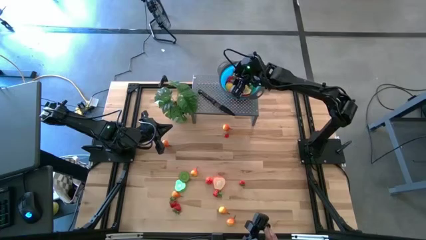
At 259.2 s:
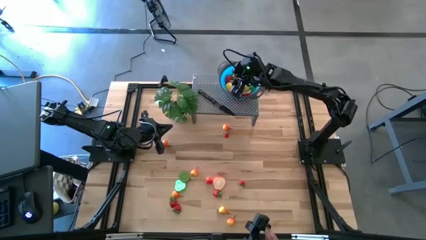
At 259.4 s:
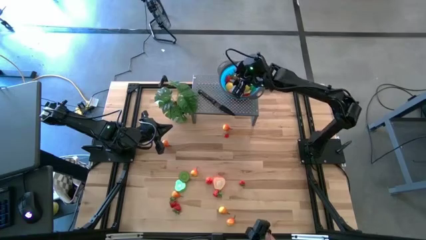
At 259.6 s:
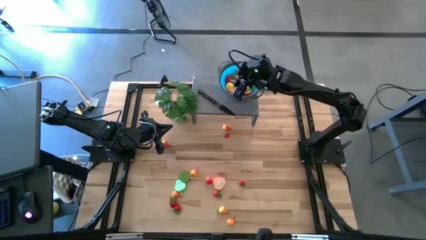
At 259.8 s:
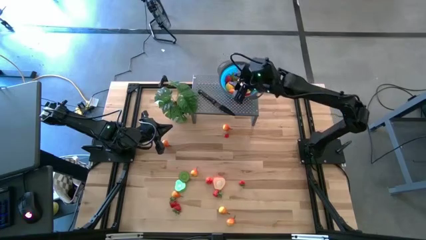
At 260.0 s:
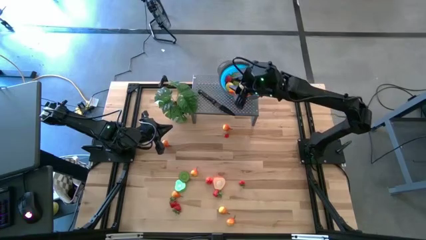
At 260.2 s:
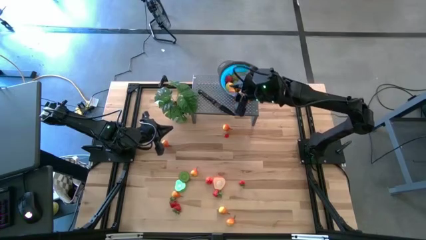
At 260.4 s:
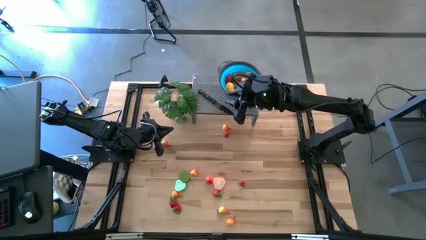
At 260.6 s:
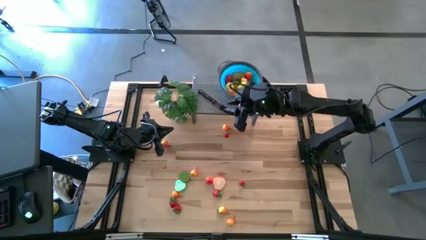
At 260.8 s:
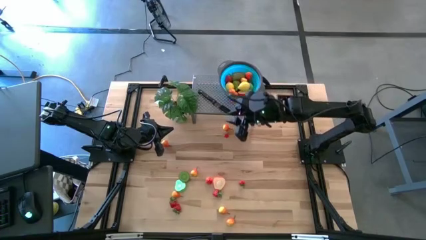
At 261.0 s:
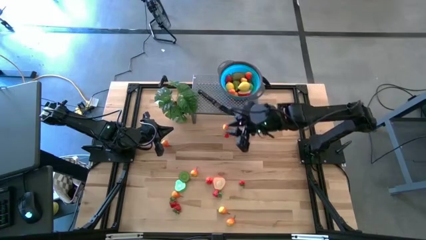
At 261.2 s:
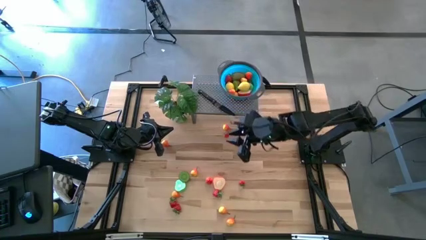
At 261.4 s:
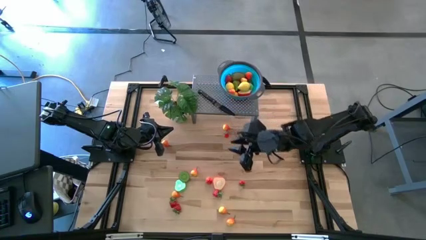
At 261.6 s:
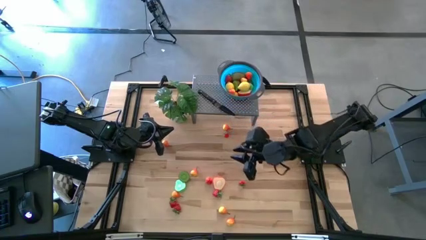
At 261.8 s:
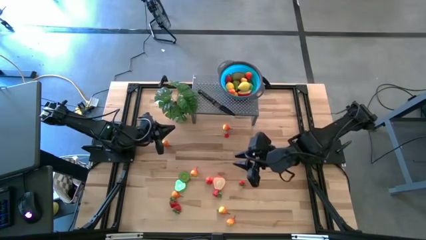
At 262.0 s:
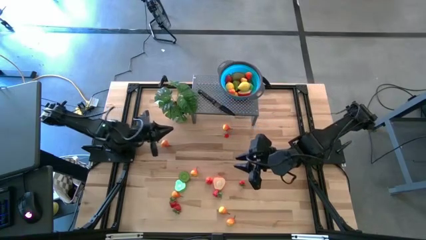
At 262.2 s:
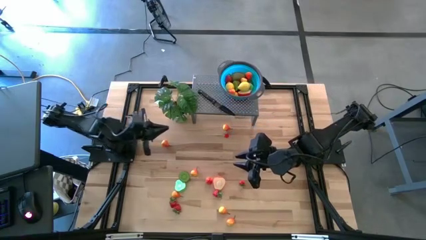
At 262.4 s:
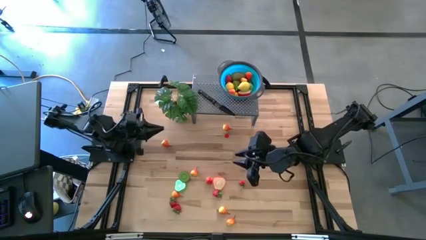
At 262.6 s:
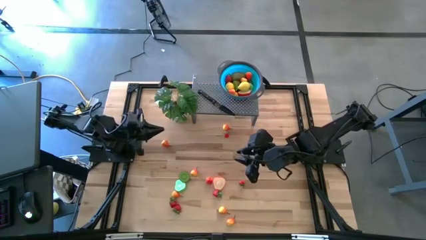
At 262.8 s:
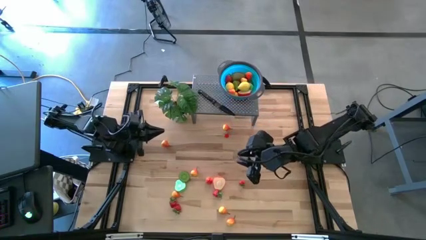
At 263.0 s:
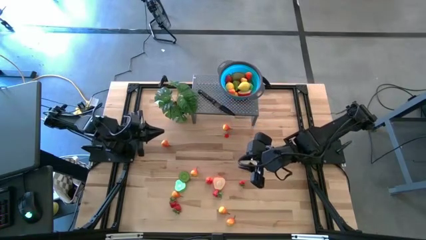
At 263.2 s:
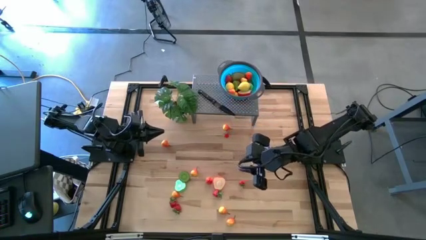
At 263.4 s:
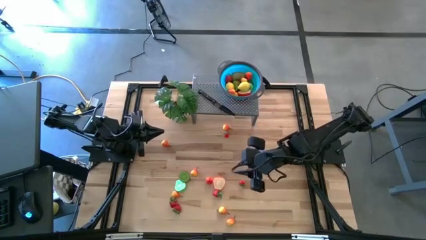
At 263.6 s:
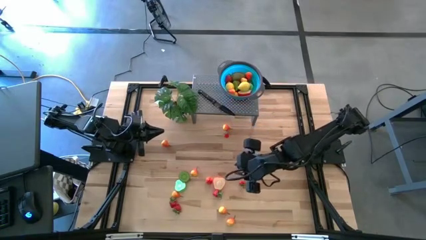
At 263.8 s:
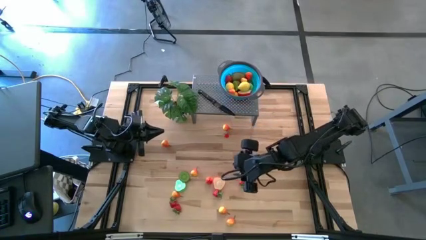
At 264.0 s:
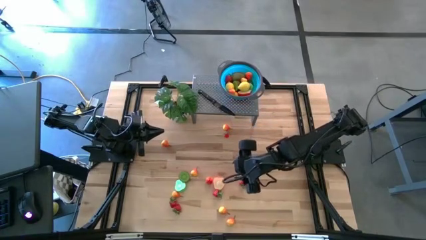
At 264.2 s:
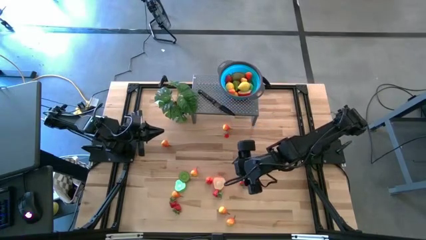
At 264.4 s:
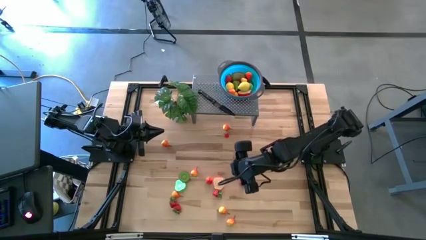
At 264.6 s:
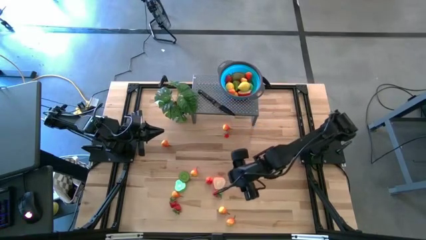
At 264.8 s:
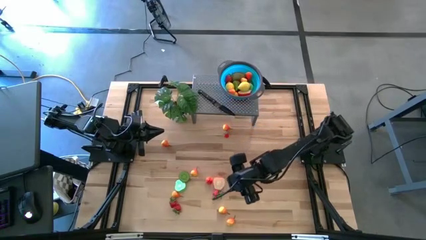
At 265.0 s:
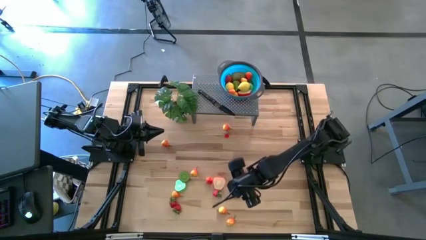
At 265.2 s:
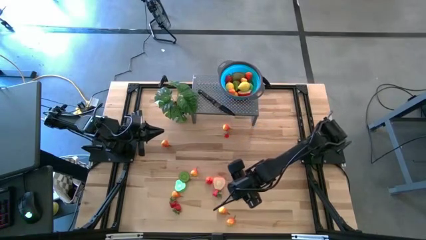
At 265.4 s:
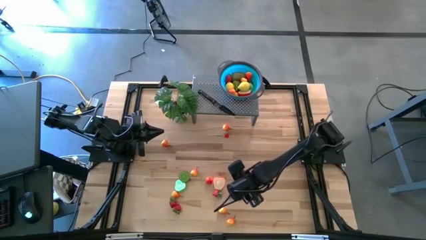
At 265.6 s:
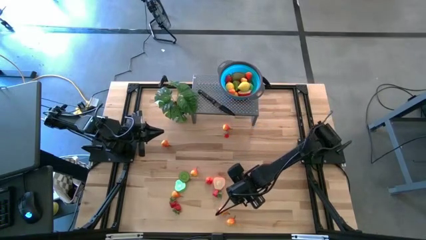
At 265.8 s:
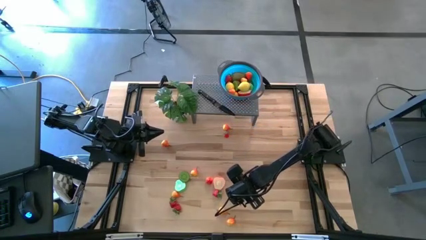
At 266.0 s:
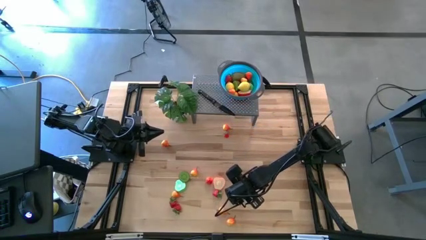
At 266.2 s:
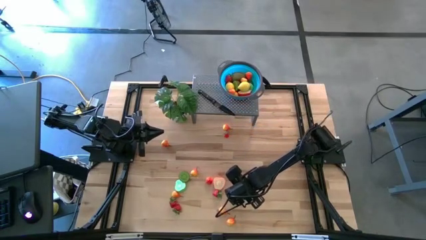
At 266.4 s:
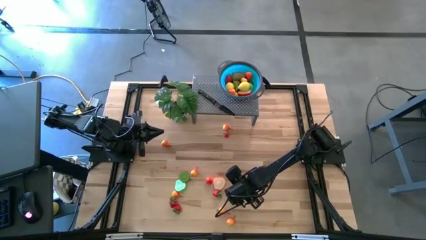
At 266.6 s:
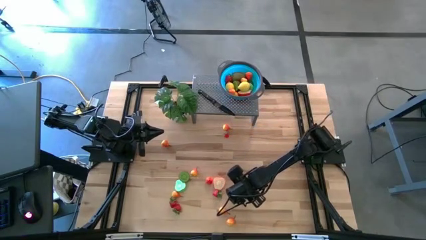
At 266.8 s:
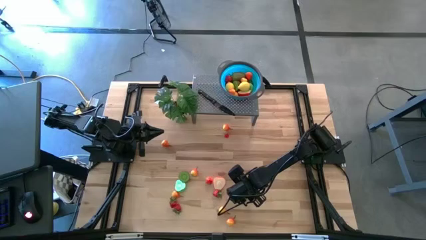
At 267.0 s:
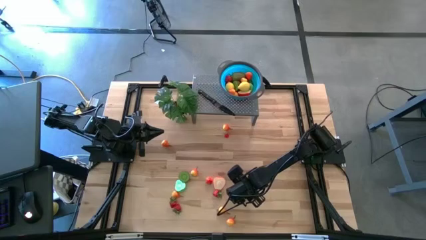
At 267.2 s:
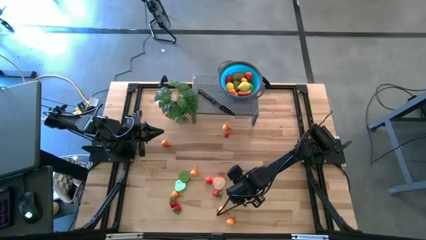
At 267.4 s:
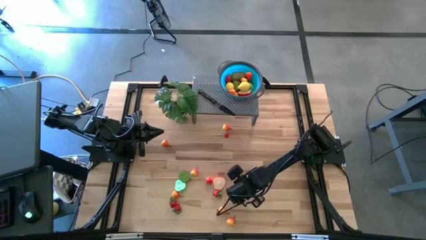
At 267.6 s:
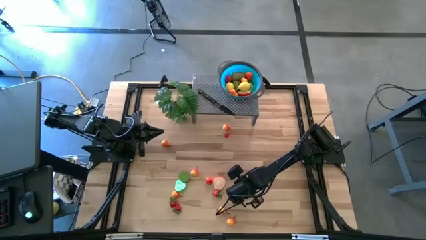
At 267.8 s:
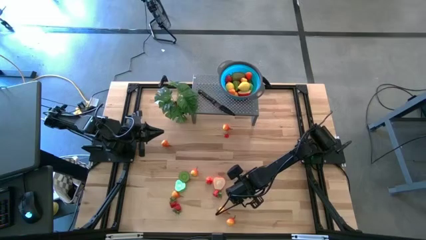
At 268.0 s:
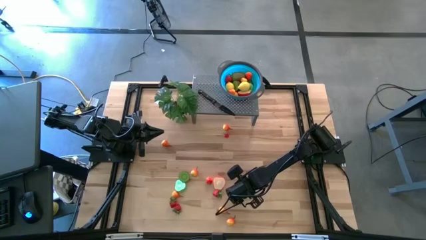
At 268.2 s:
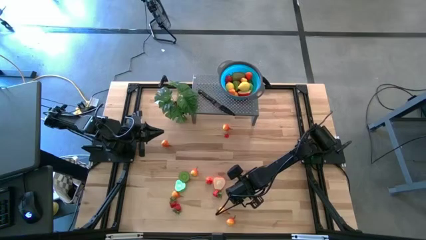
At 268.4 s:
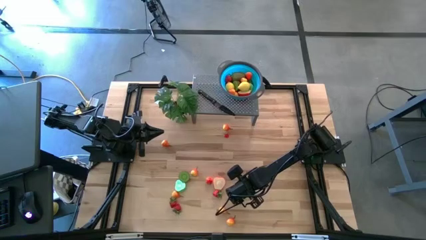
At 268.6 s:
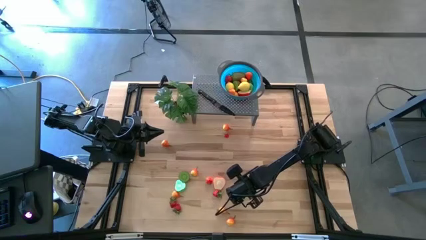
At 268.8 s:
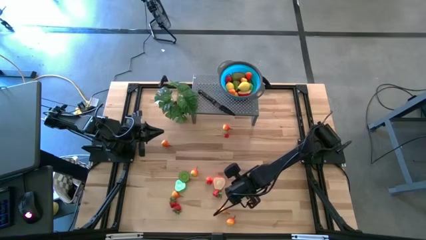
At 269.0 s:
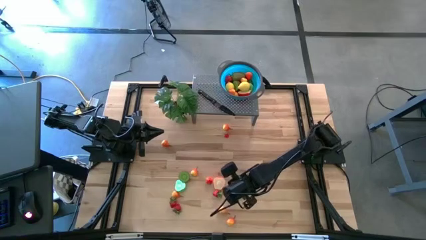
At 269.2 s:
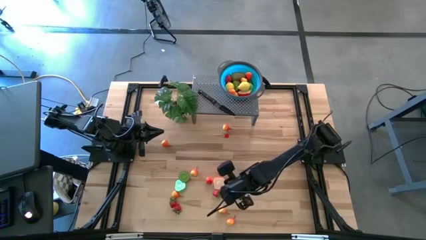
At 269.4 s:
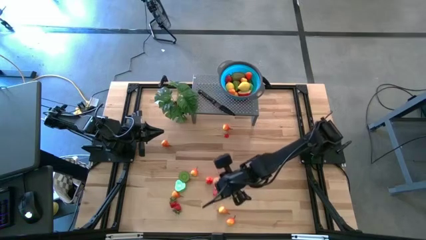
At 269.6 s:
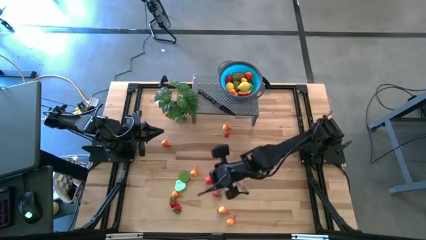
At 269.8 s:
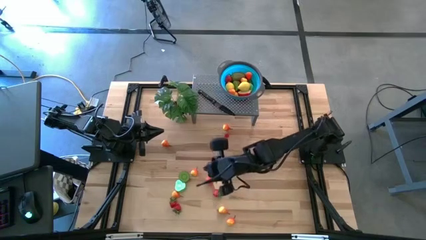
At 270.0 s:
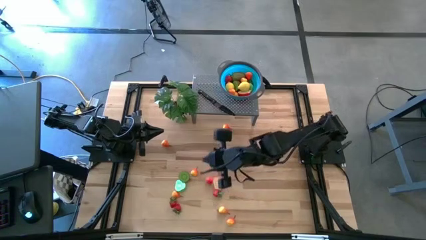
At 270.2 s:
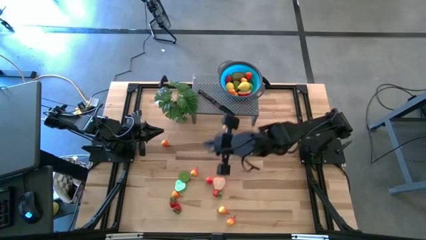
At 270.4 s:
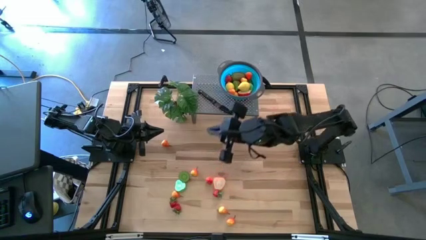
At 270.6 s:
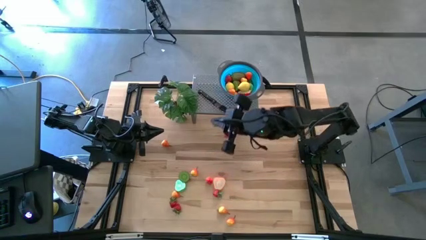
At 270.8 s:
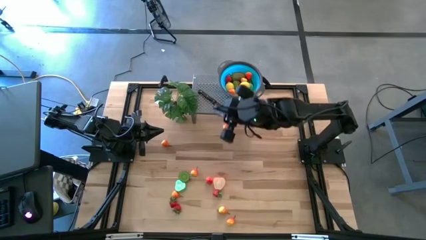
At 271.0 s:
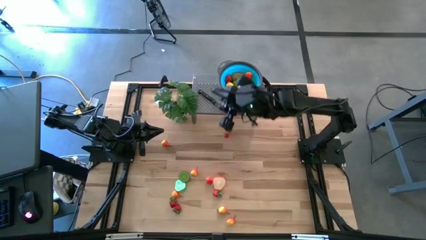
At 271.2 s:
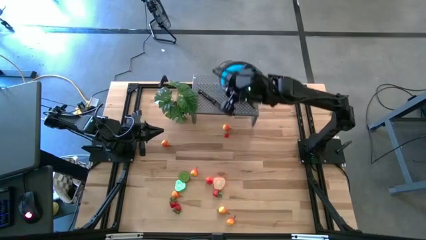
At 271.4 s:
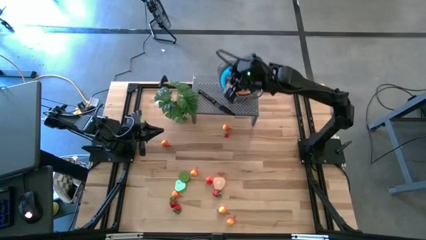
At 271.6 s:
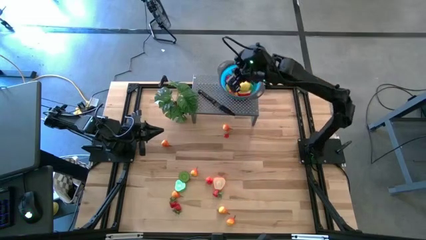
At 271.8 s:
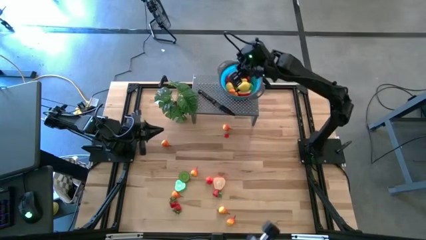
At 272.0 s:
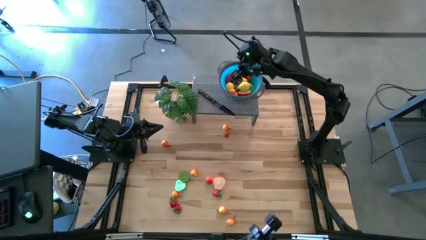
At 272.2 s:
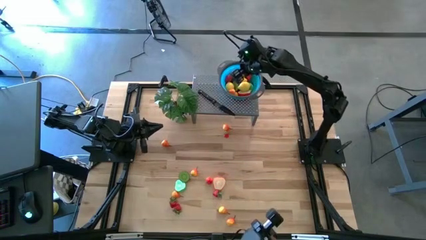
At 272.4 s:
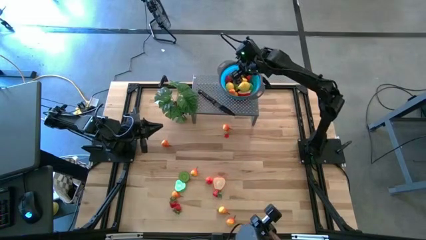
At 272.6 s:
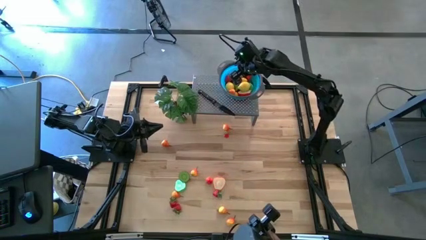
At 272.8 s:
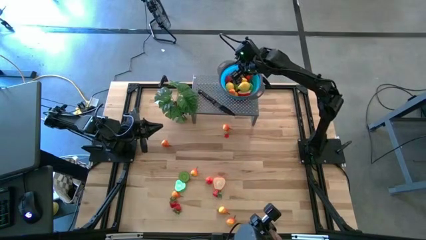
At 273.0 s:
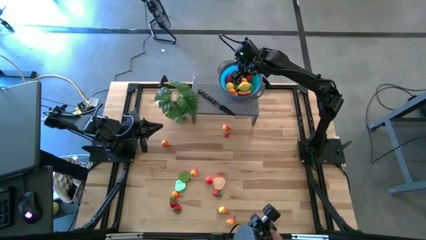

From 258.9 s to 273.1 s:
Task: Pick & Place Fruit
Put the red strawberry in the blue bowl on the shelf

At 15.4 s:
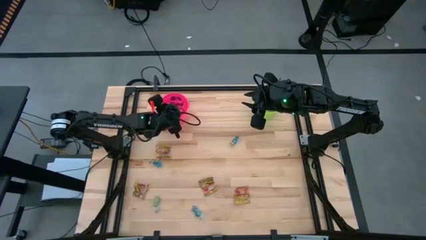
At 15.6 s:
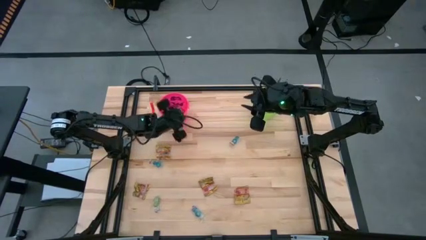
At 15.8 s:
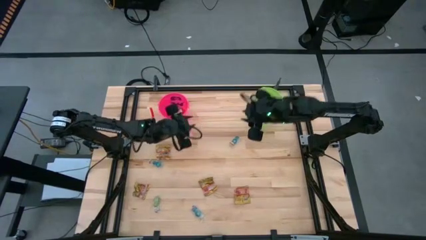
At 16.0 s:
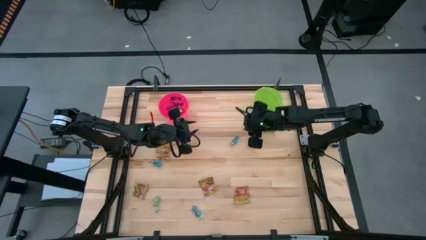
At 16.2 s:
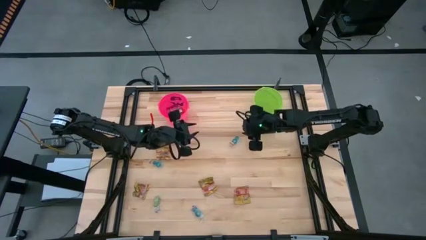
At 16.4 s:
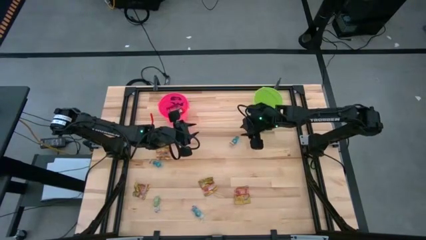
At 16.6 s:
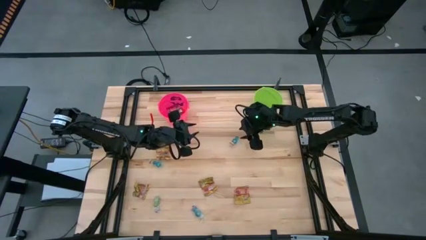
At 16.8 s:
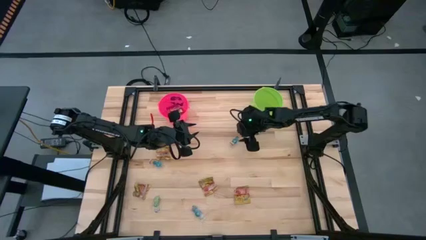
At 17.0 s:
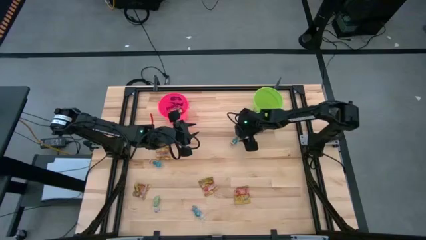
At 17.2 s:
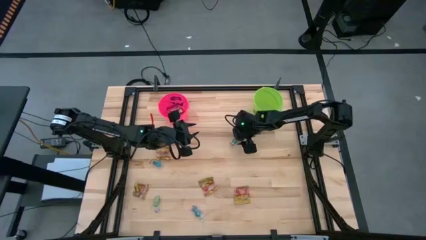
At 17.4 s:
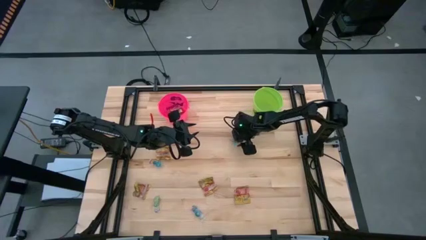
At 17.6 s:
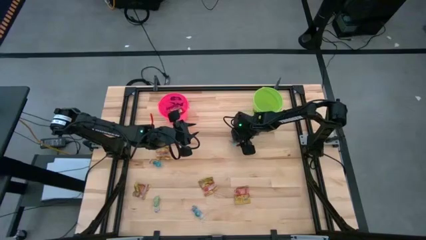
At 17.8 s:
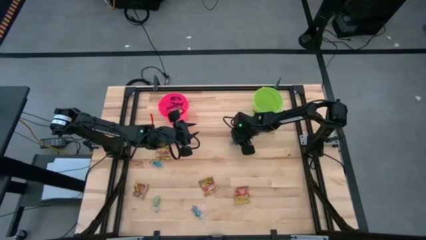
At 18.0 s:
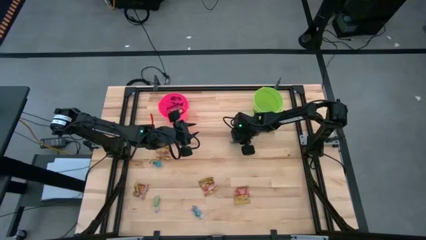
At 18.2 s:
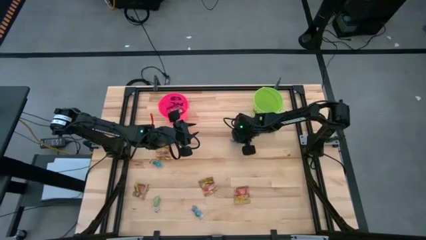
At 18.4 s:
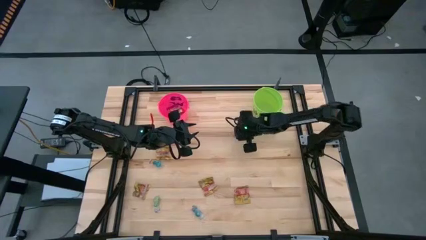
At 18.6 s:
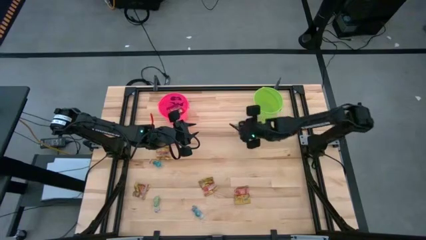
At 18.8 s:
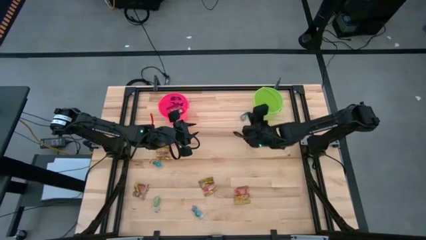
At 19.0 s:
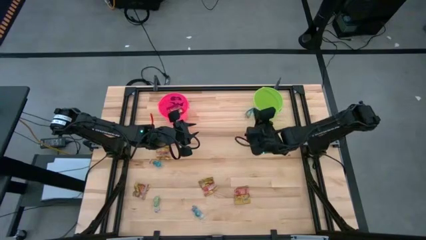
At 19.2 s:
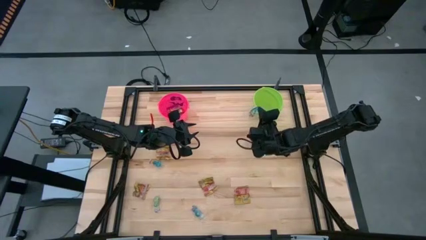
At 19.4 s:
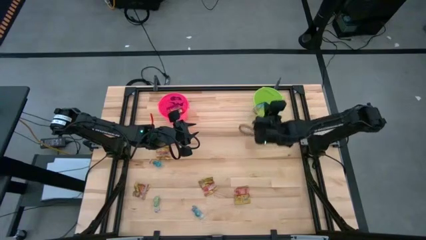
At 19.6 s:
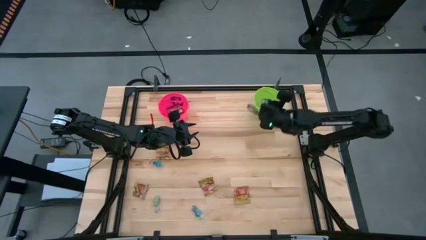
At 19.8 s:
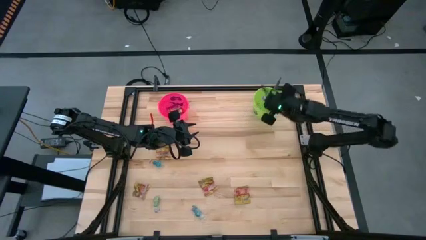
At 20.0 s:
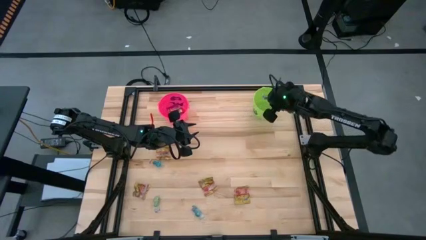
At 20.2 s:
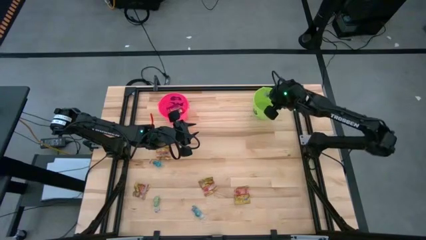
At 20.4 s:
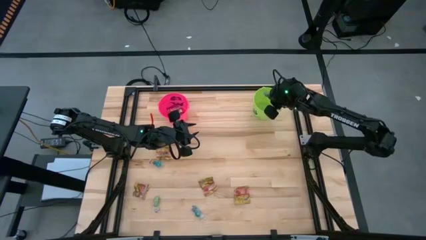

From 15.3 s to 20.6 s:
Task: Sort candy by brand, put in halloween buckets
Put the blue candy into the green bucket
